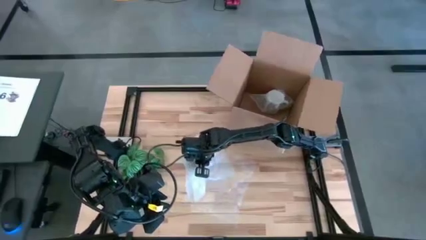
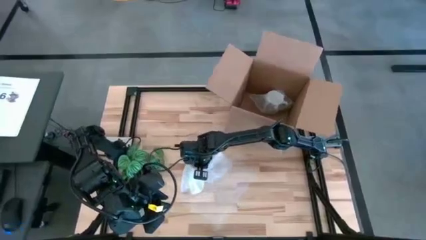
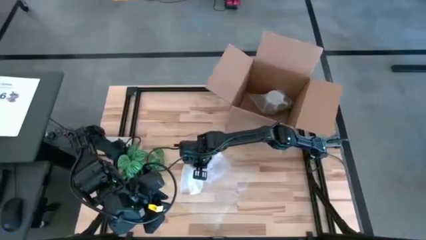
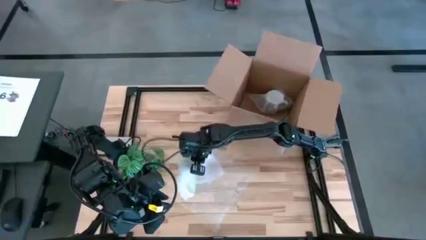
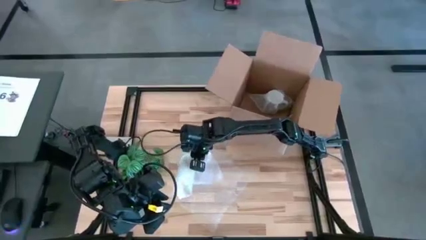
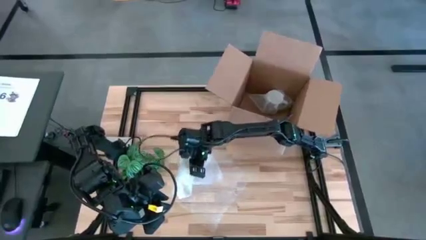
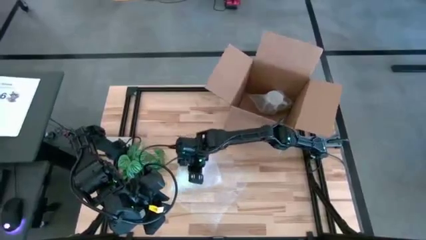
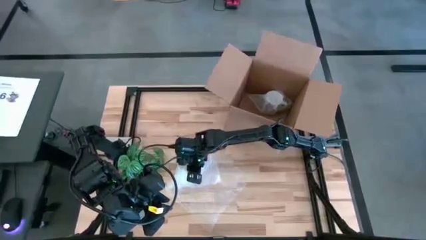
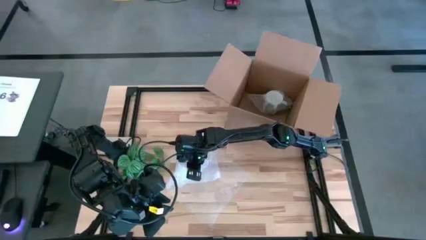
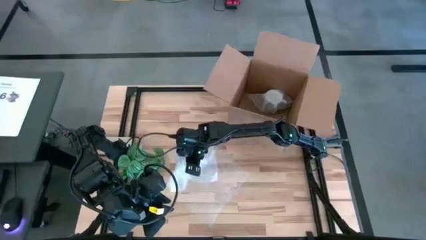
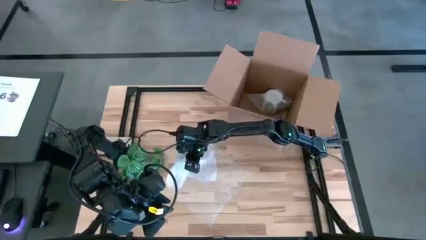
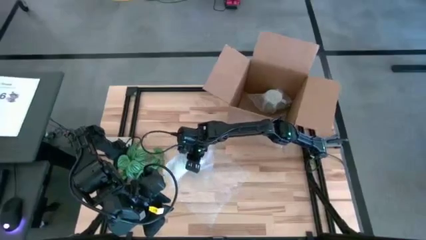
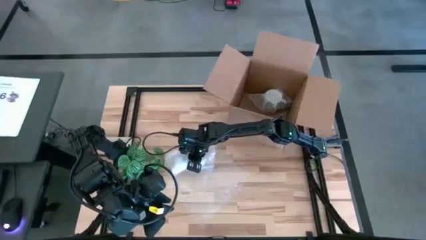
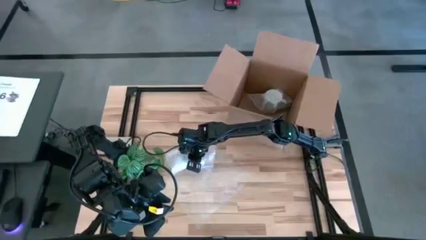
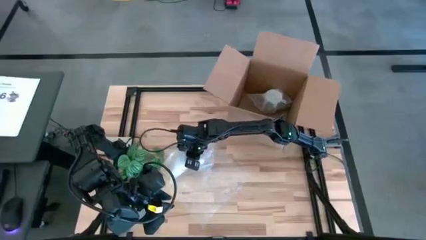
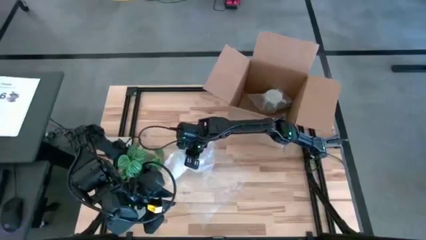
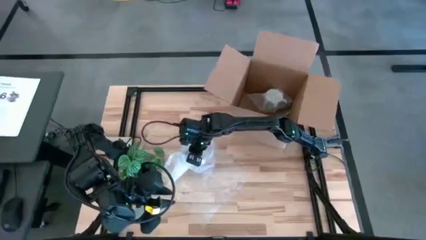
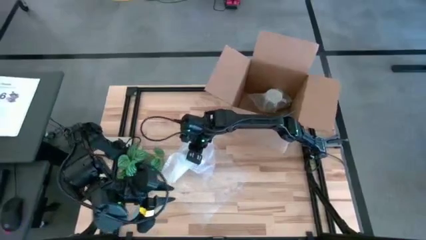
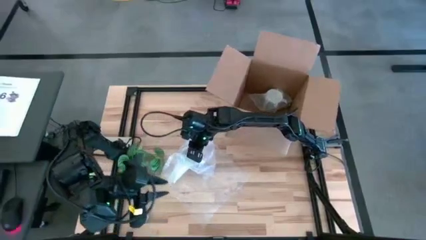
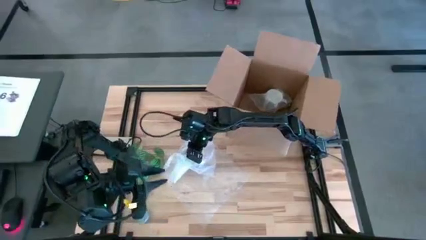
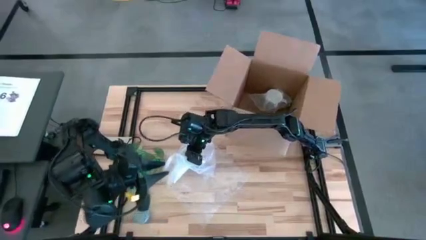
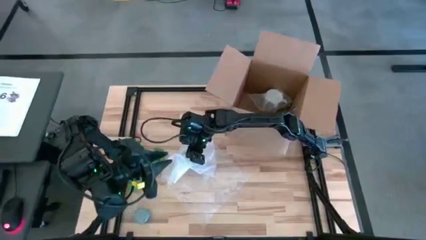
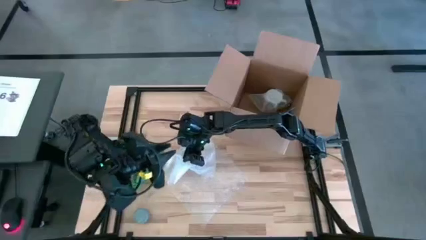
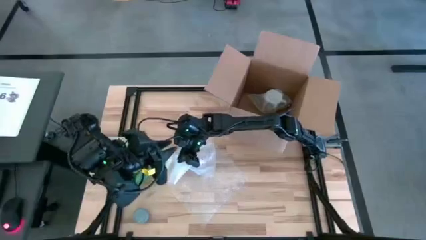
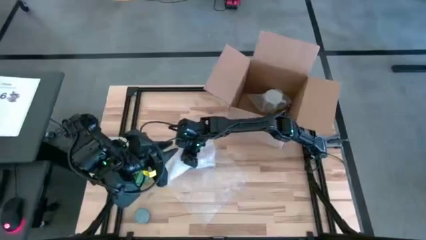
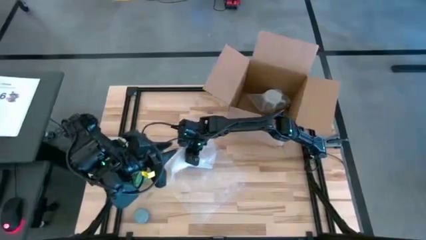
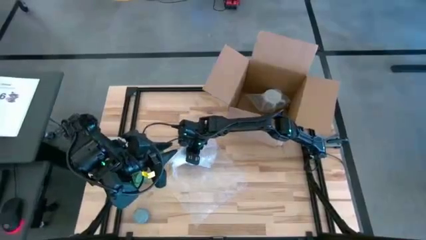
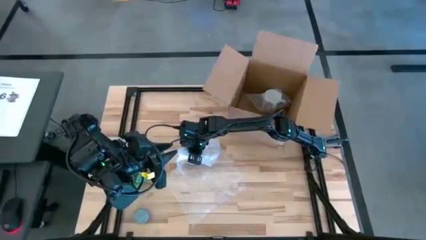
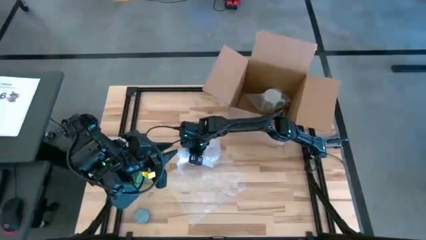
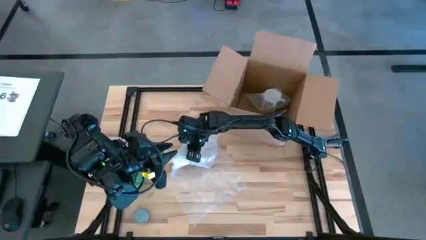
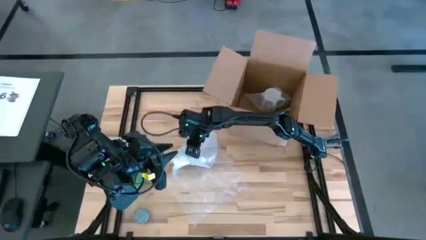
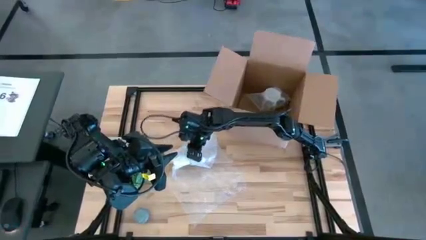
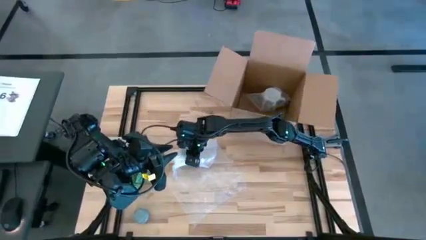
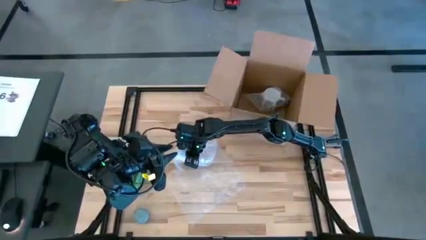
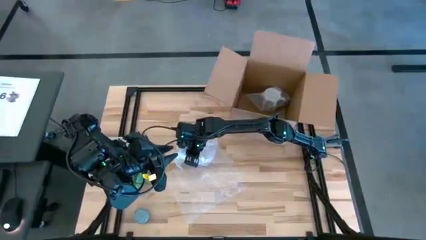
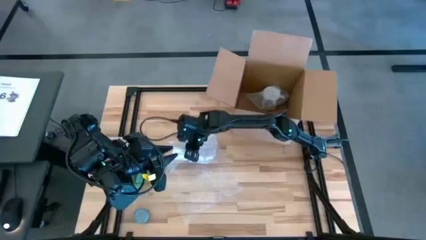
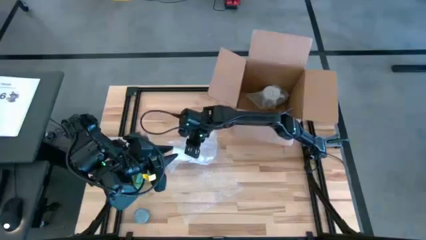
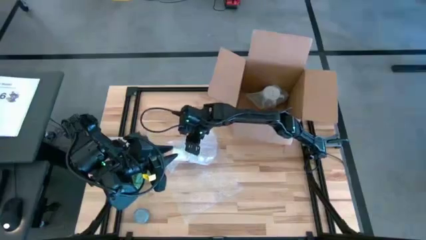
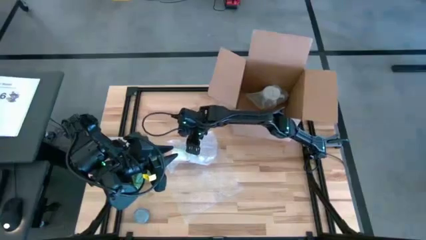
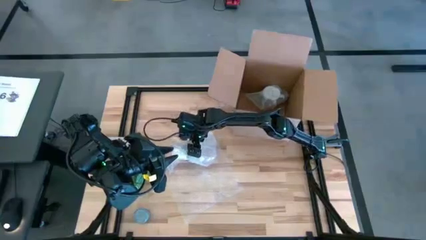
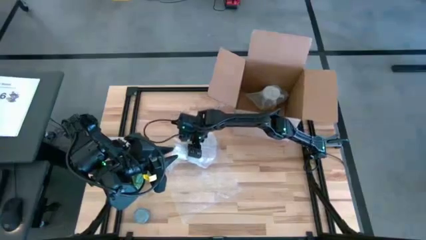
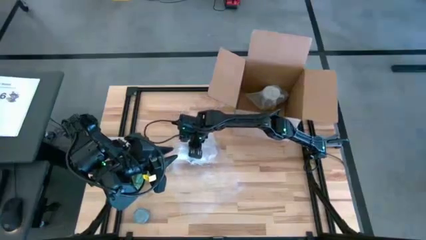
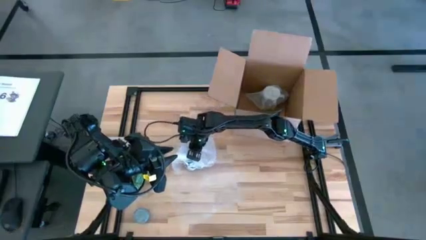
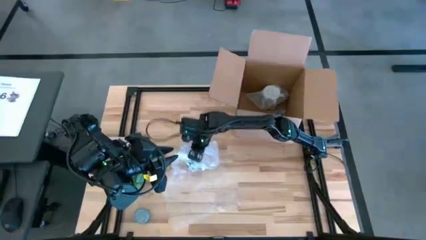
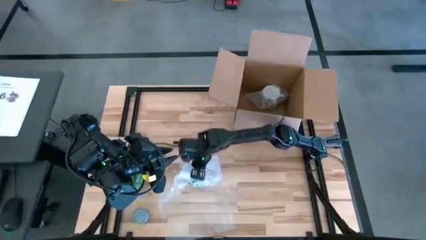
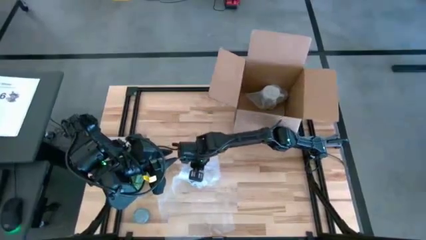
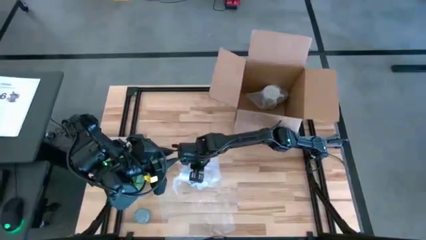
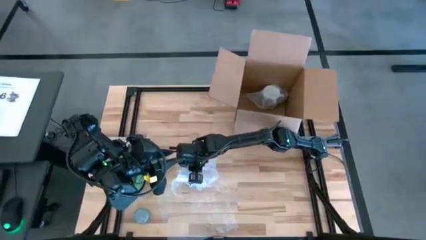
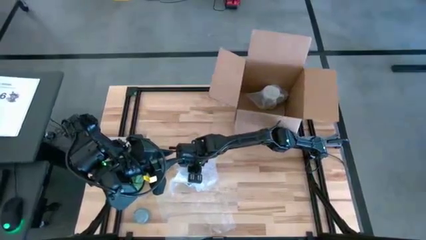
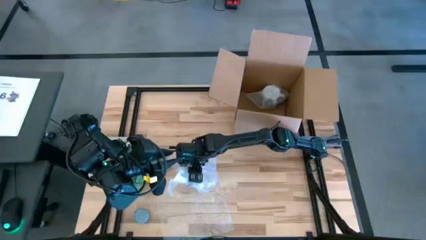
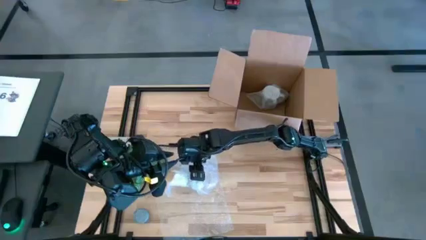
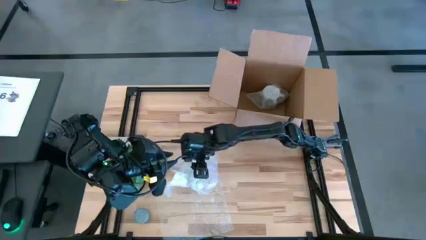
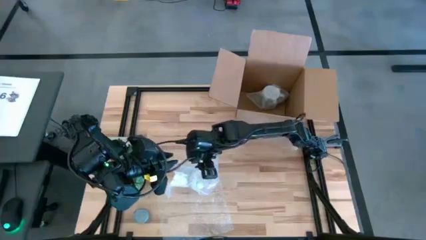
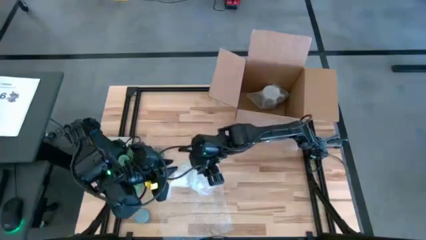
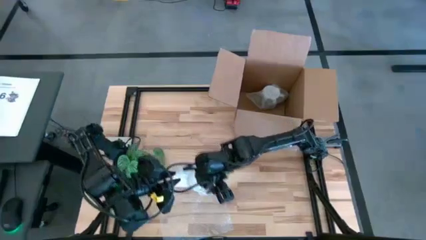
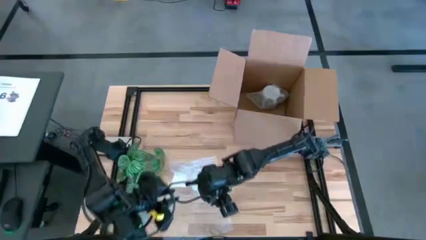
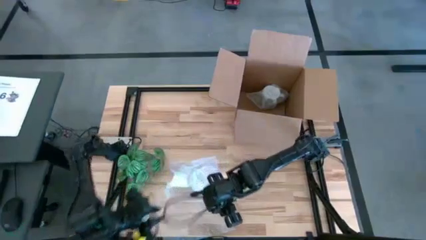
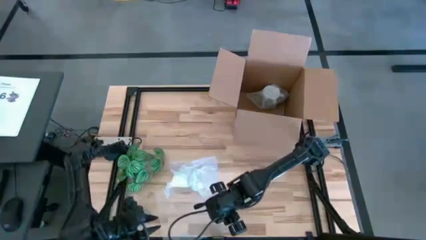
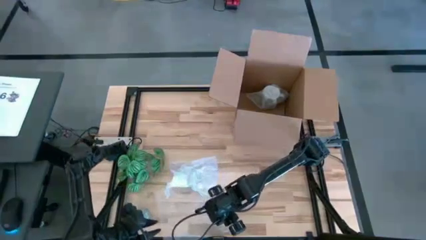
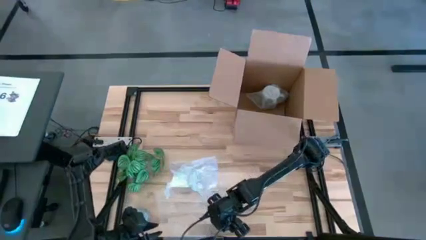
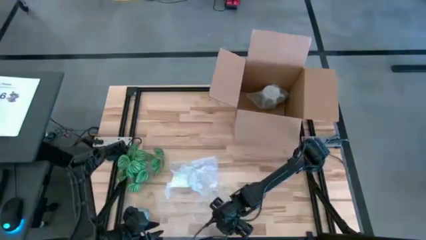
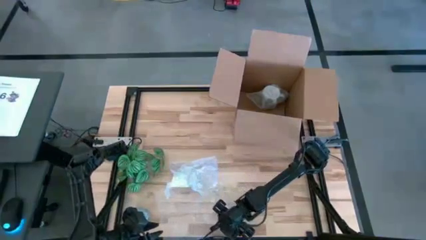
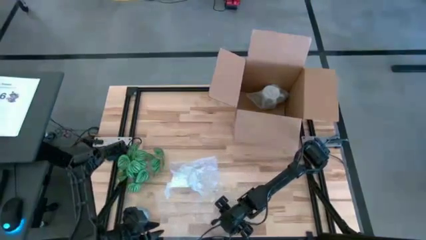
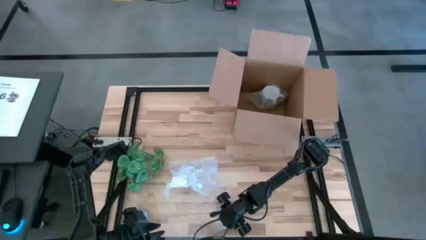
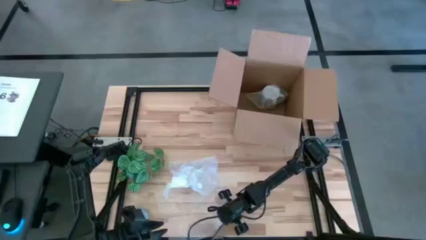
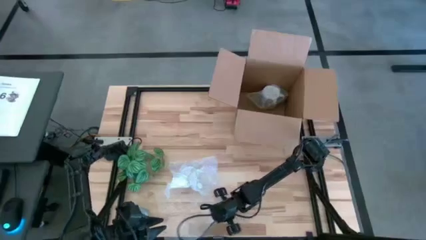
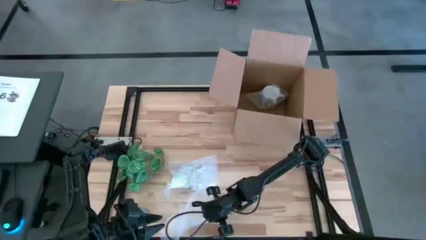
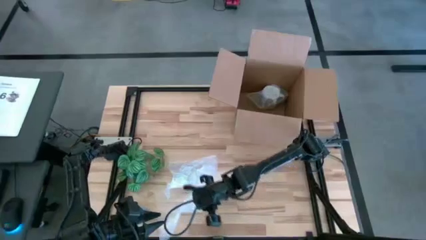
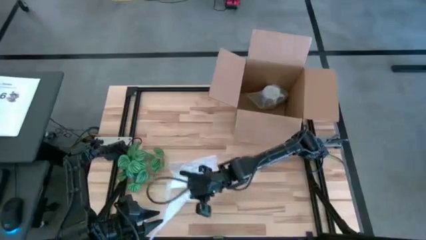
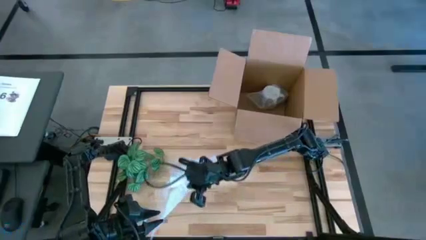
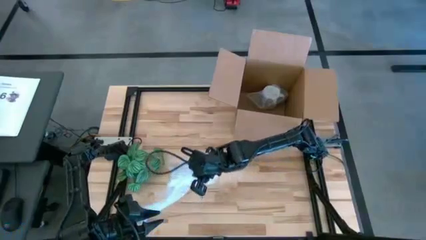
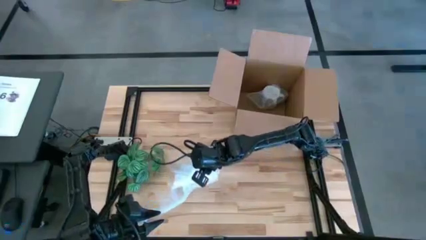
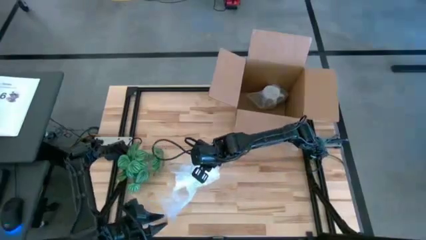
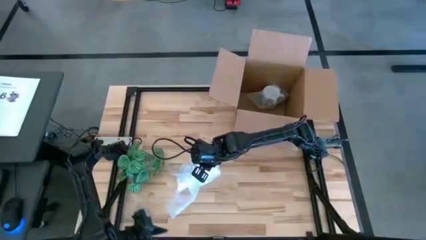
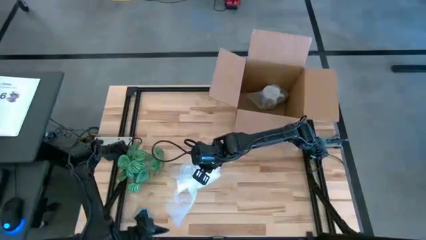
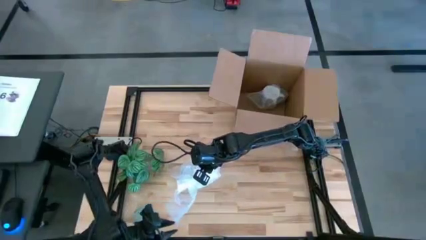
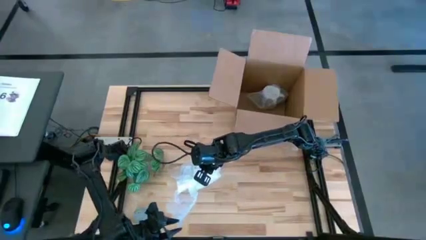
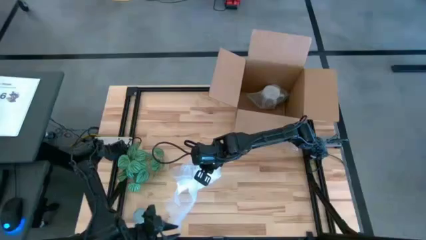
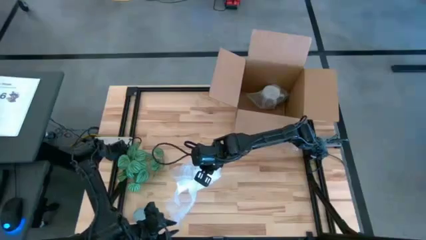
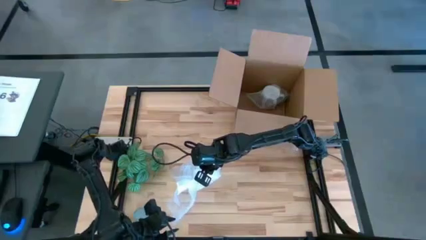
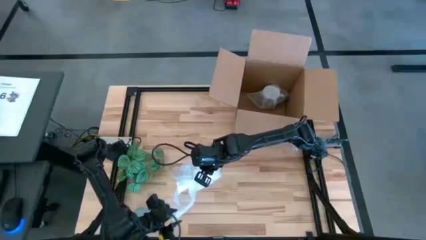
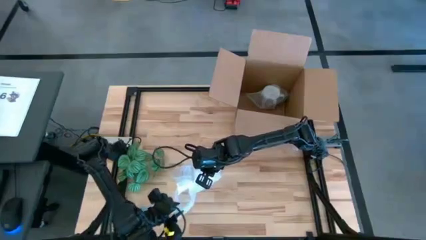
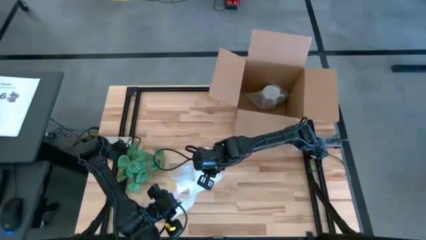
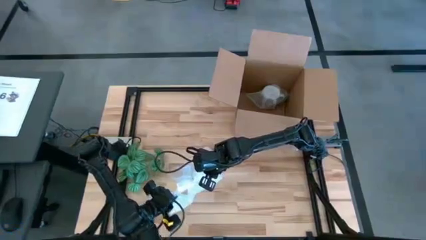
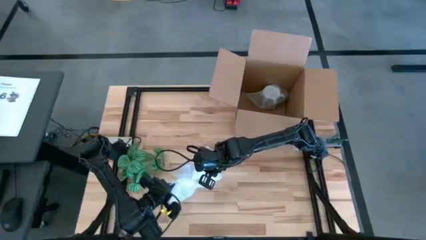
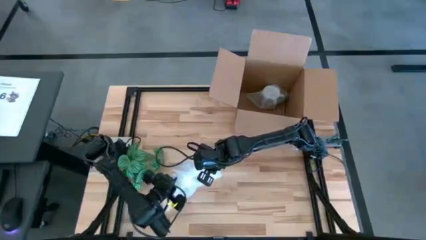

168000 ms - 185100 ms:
Task: wrap mug
Wrap the blue mug with bubble wrap
